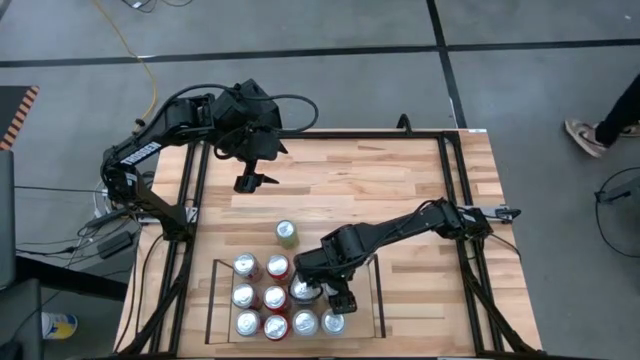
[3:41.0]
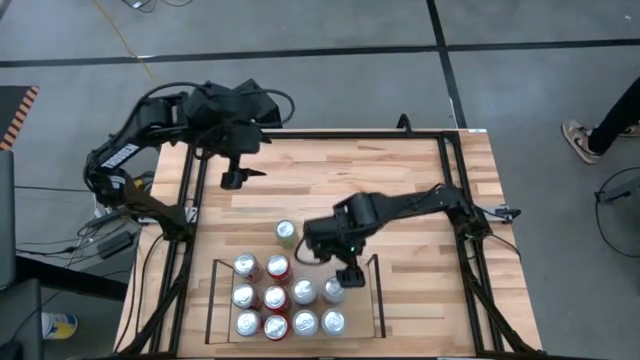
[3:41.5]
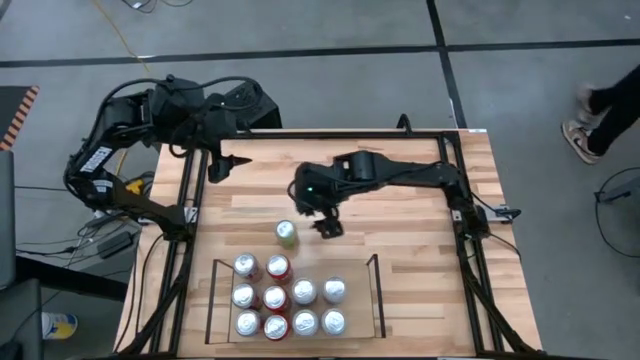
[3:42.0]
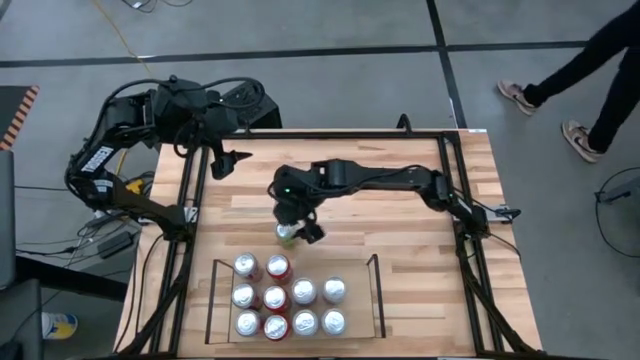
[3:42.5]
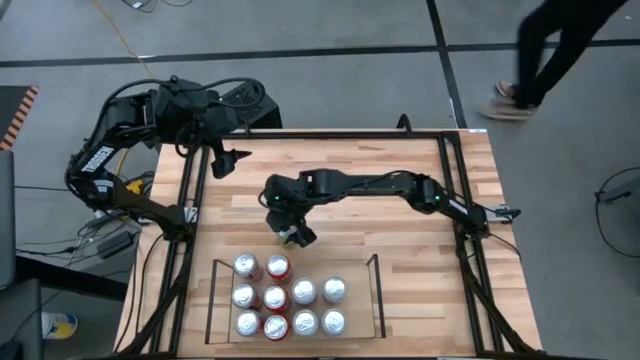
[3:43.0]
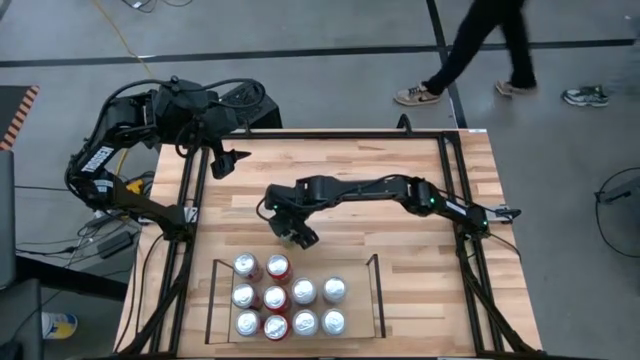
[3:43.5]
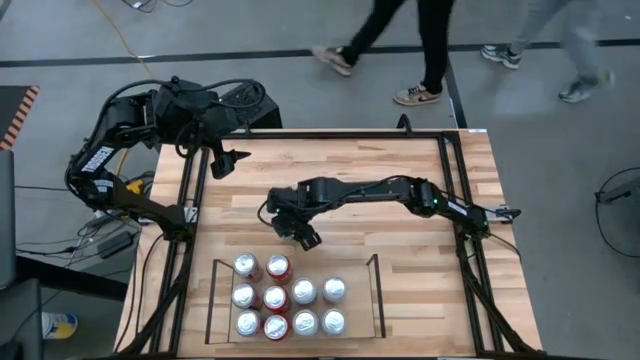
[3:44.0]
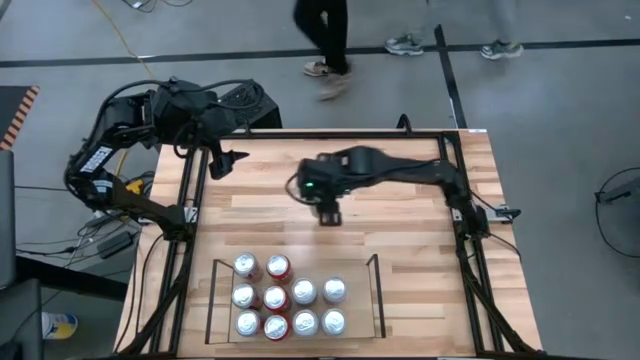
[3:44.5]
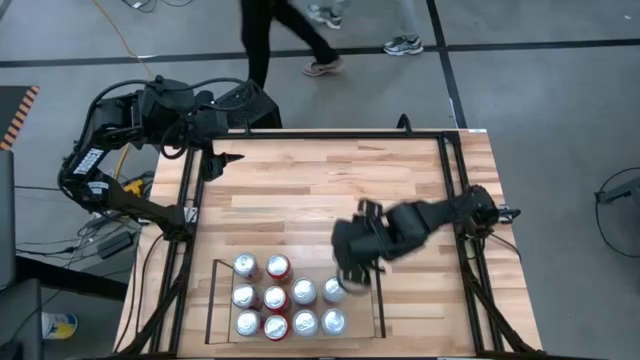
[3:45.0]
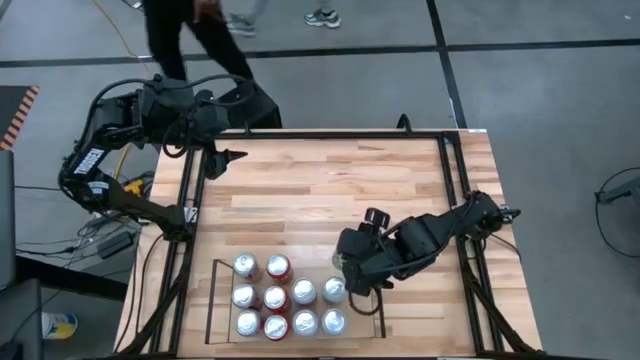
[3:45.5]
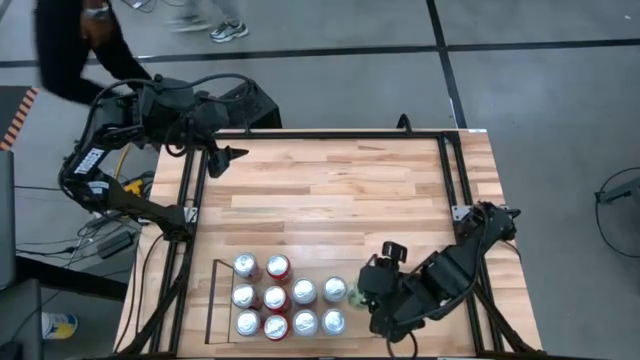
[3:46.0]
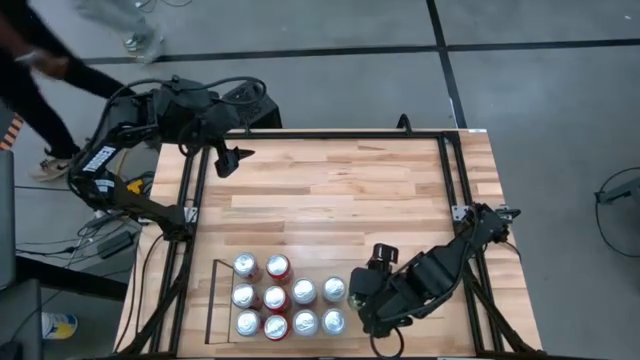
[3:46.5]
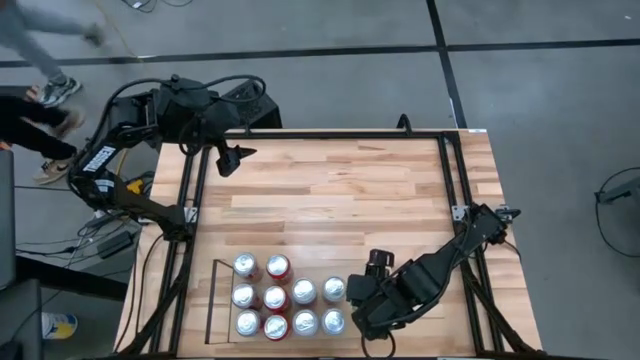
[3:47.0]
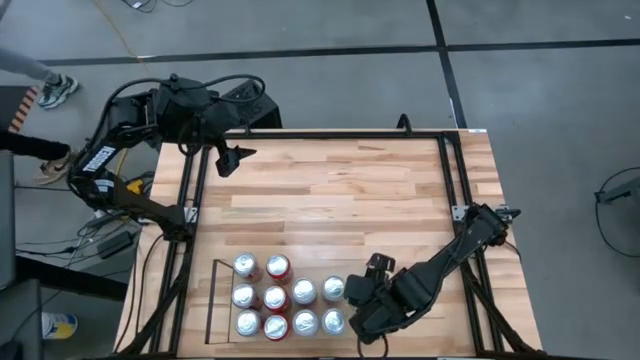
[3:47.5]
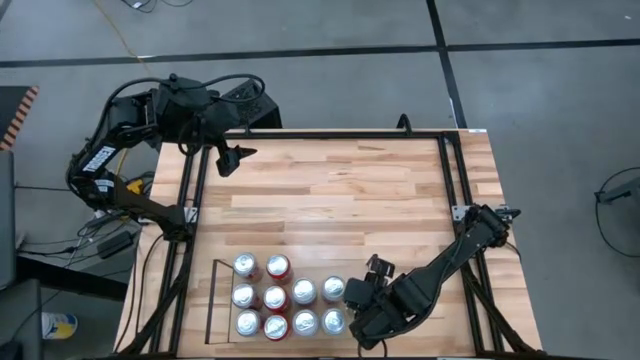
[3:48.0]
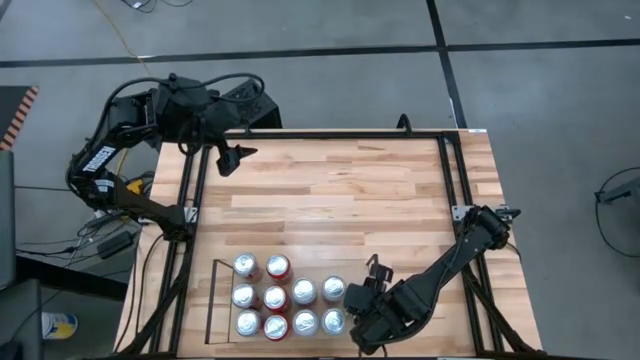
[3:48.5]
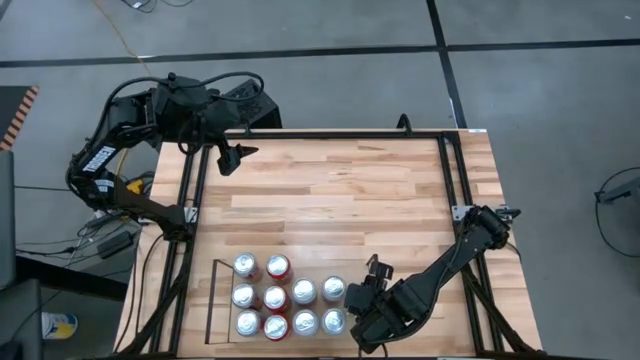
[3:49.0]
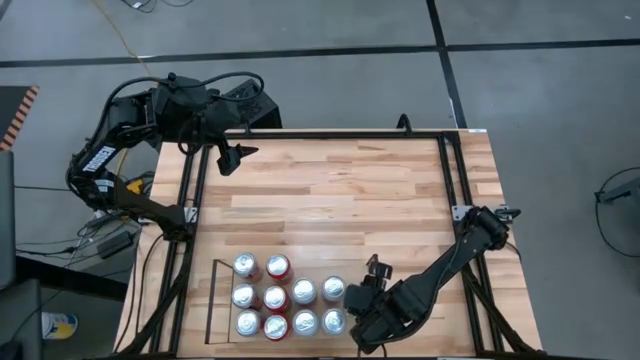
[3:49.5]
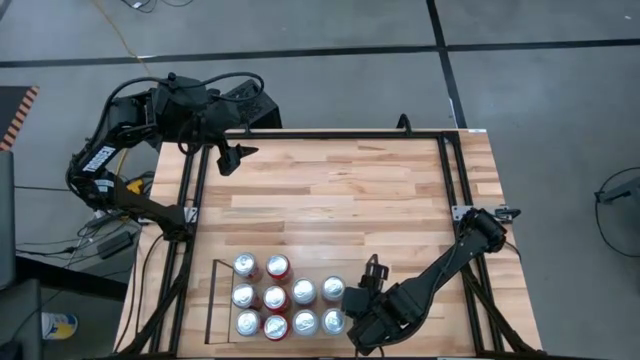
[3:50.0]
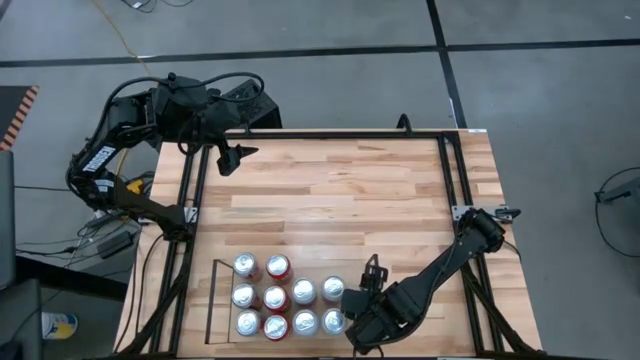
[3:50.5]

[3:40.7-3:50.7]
Task: Place canned beverage on shelf
Put the green soda can on the shelf

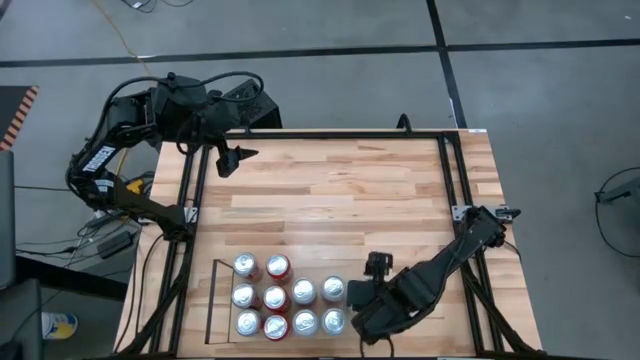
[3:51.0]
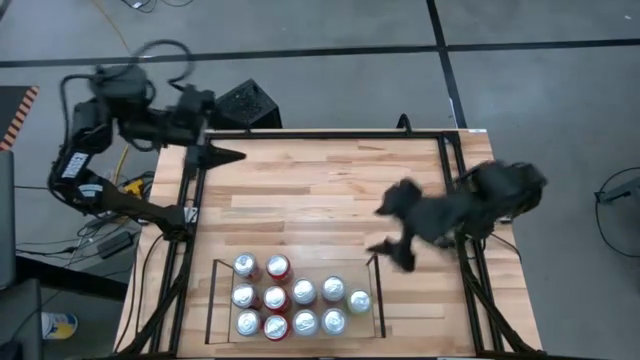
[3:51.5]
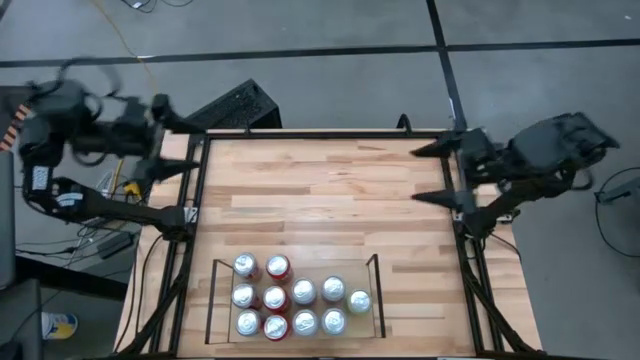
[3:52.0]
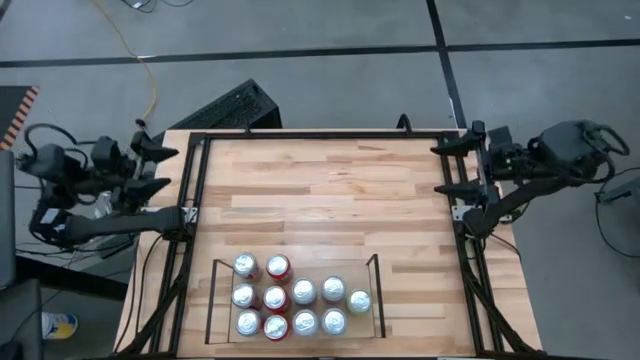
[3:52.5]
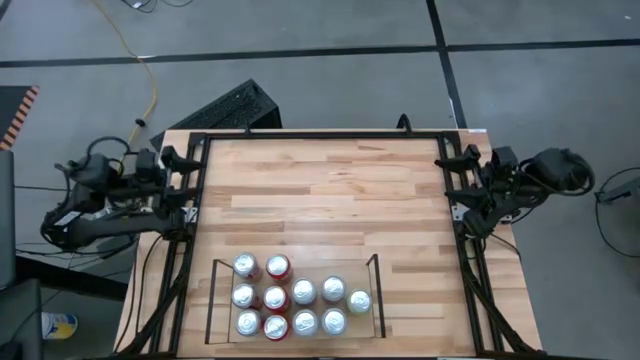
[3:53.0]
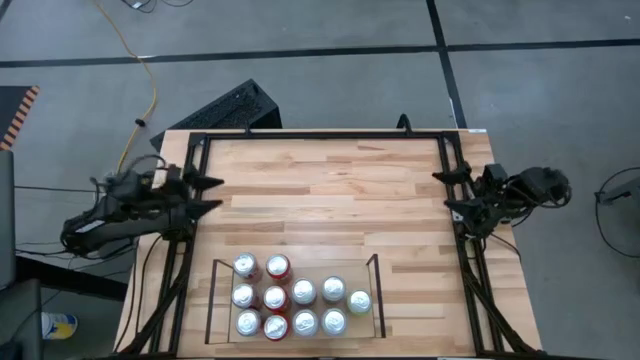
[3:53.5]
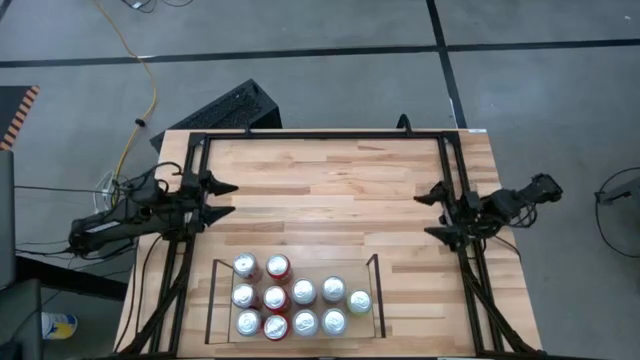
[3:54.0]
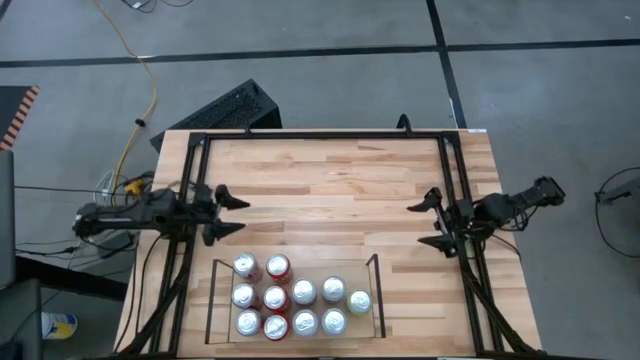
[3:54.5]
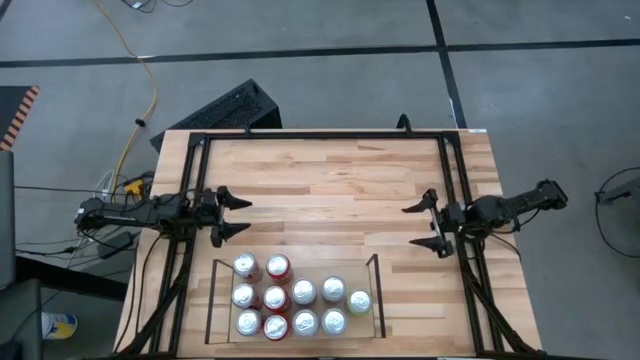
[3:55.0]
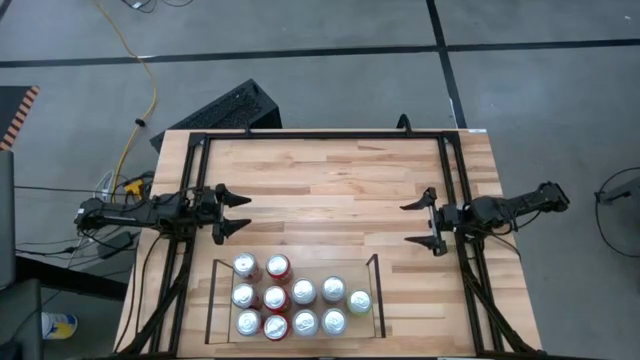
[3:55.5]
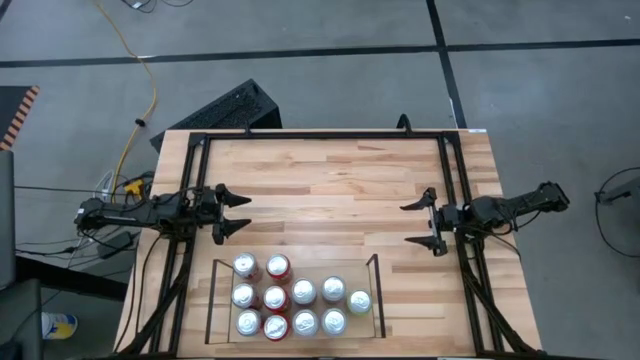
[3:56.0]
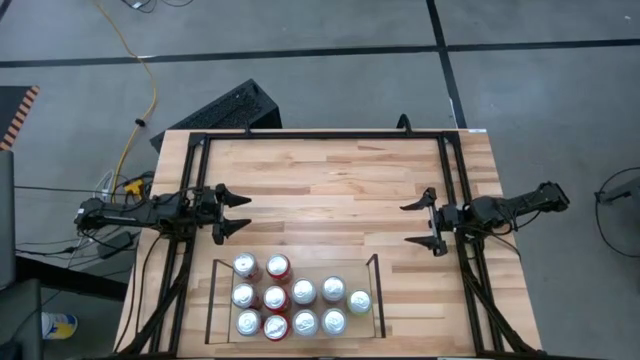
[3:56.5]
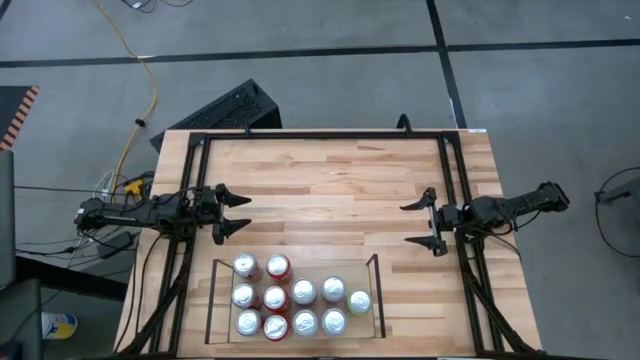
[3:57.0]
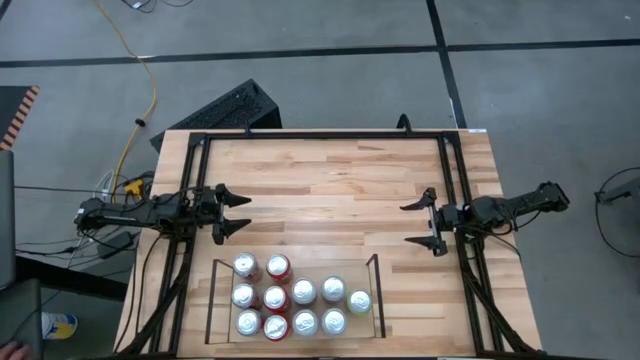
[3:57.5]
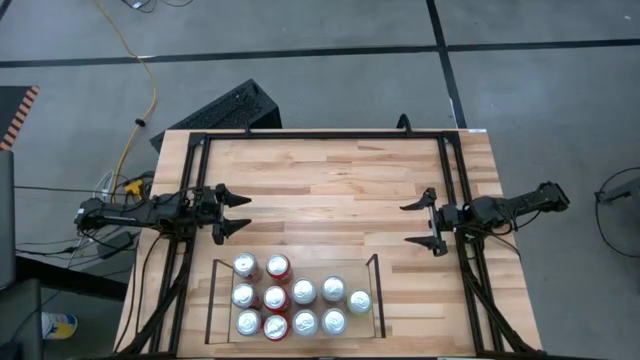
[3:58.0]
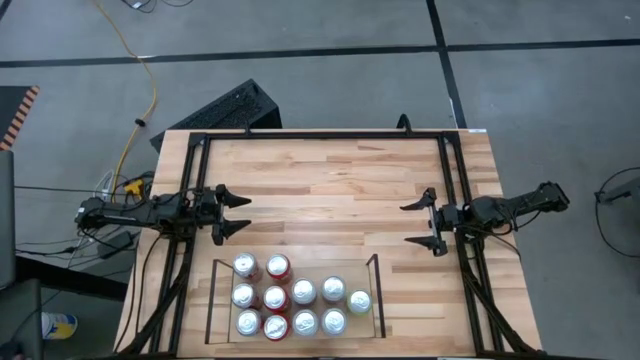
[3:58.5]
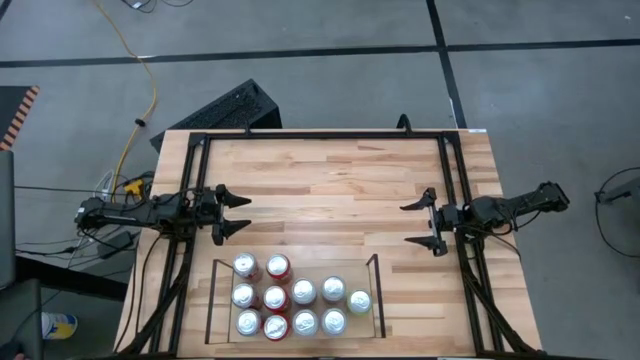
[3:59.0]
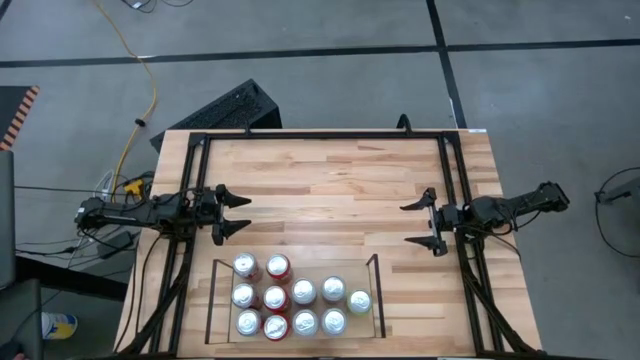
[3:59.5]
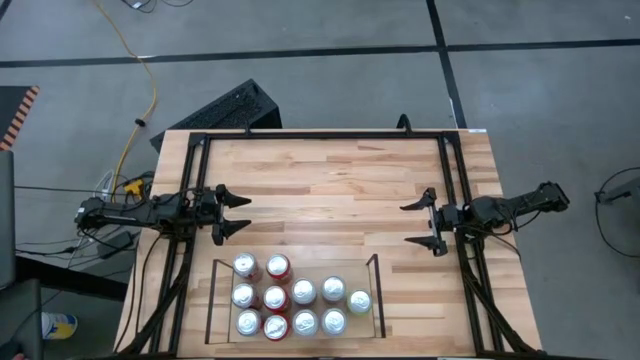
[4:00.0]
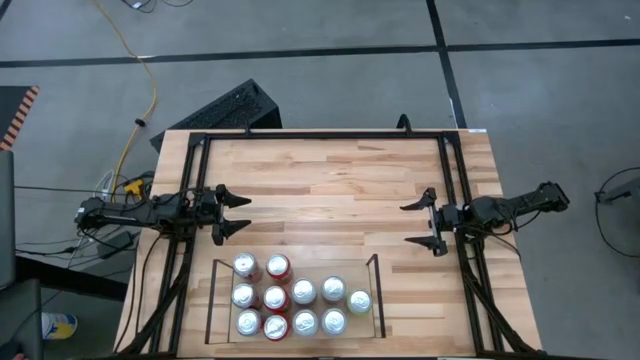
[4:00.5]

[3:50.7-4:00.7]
Return to Home Position

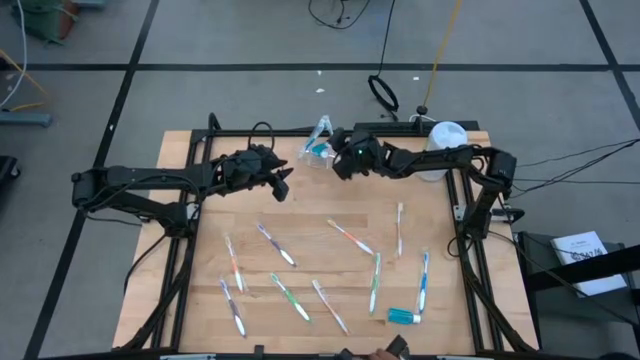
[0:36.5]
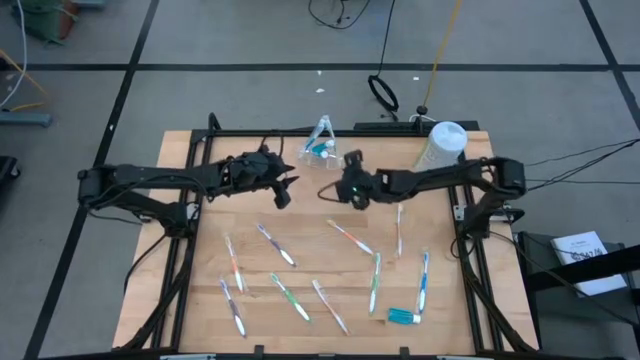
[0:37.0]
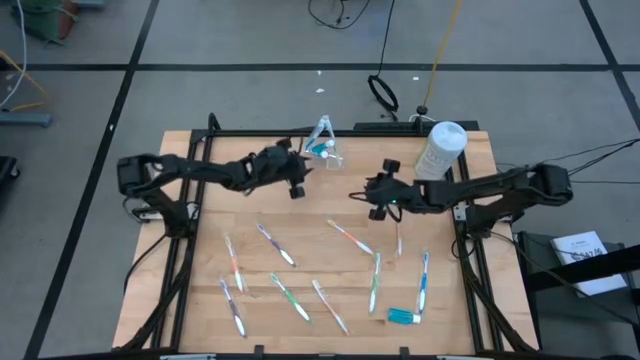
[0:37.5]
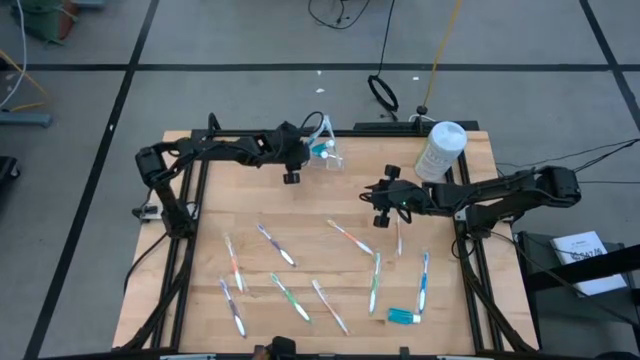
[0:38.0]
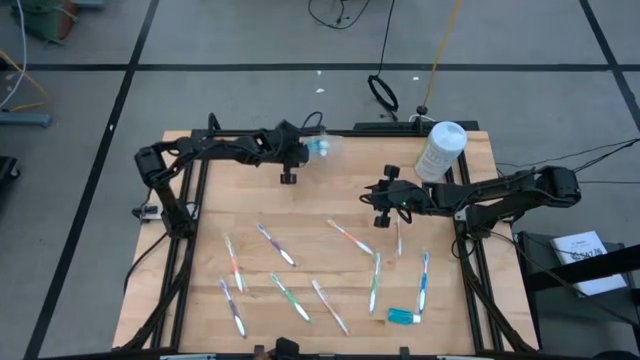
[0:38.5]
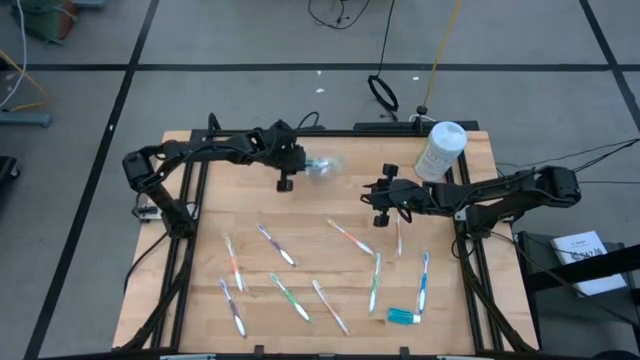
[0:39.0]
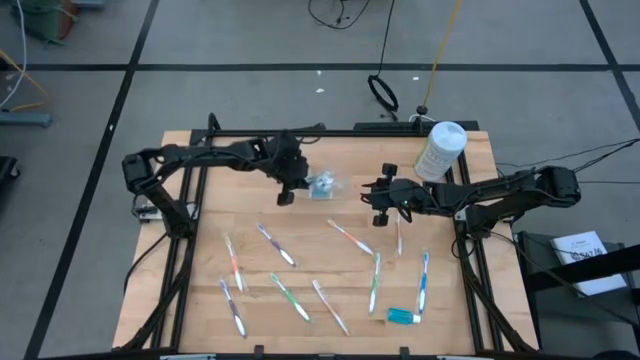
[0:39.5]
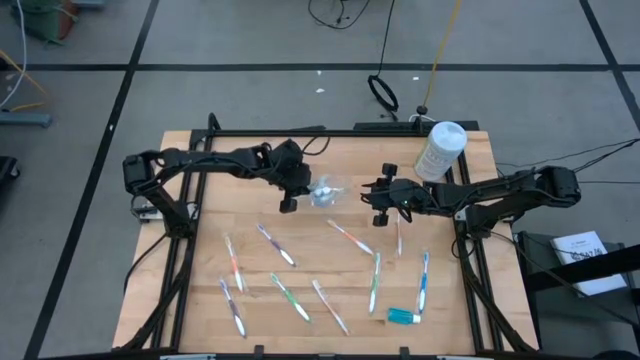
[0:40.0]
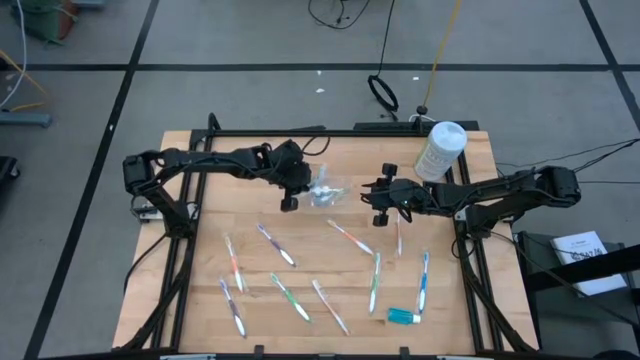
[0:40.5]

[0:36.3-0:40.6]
Task: Pick & Place Toothbrushes
Move the transparent organizer to the center of the table
